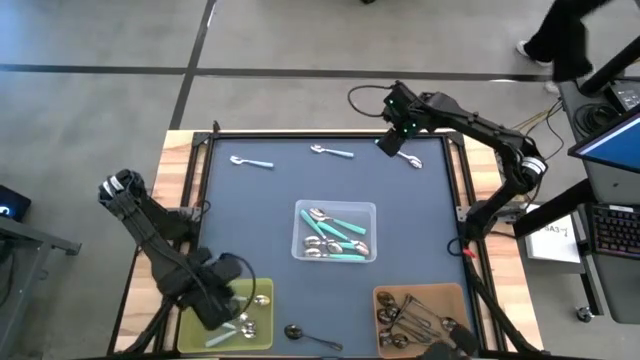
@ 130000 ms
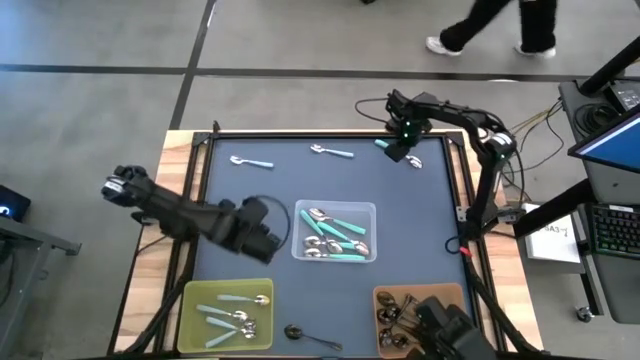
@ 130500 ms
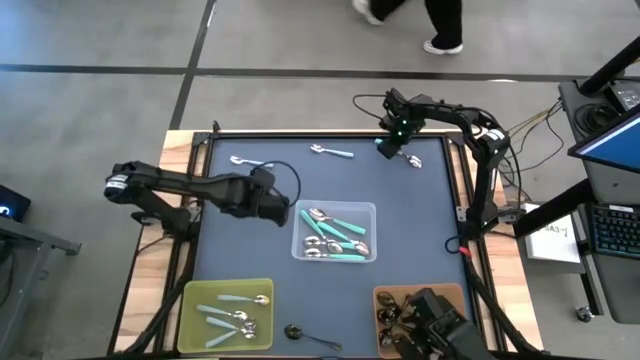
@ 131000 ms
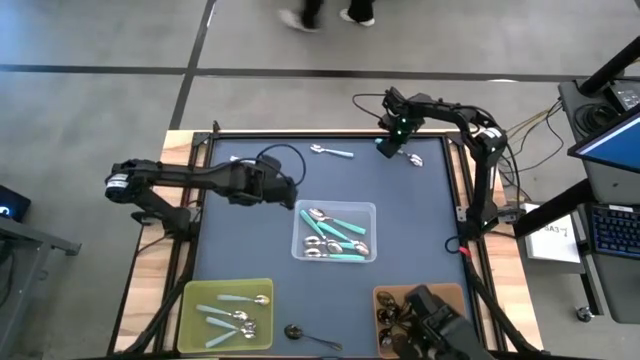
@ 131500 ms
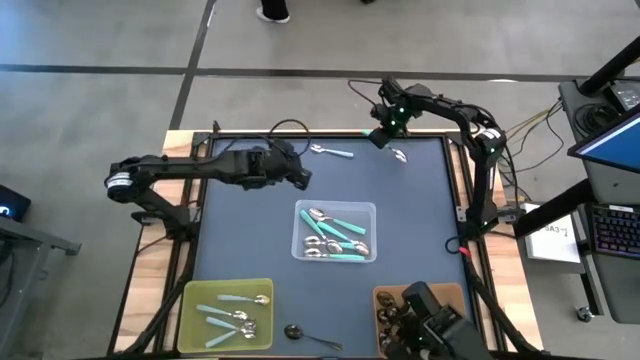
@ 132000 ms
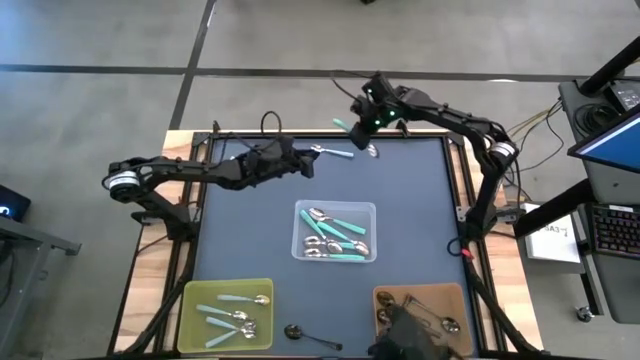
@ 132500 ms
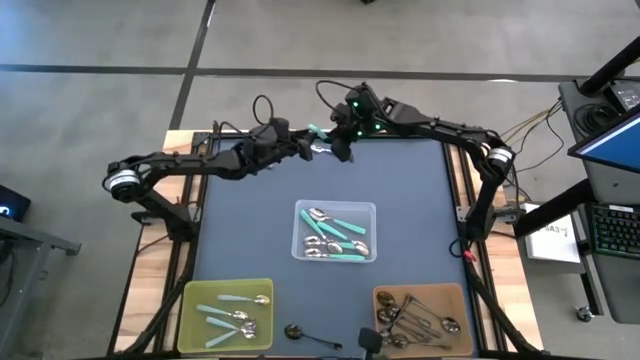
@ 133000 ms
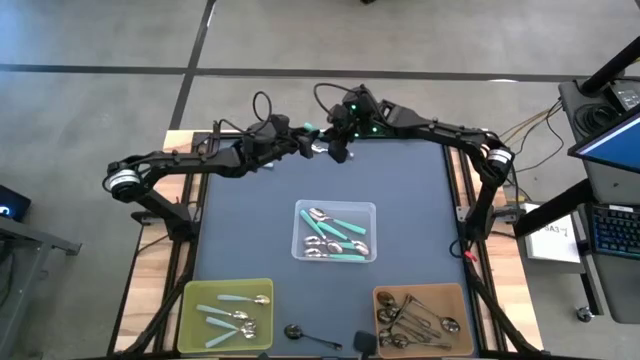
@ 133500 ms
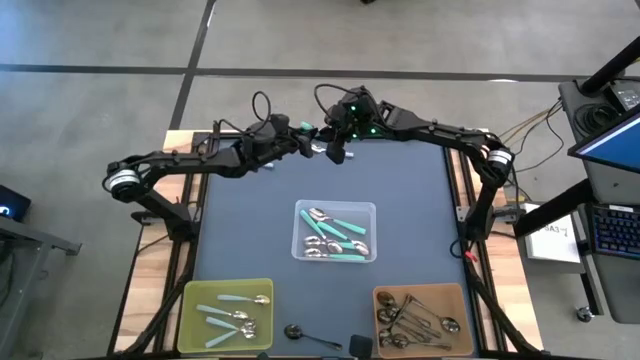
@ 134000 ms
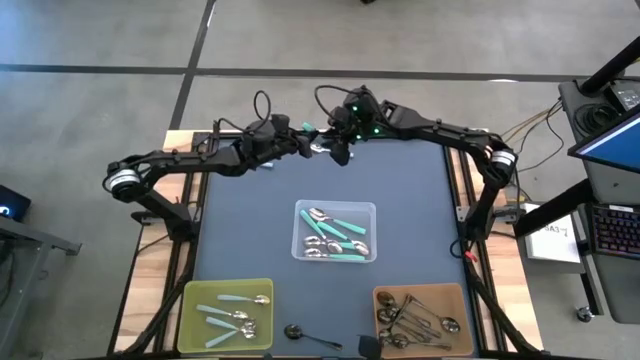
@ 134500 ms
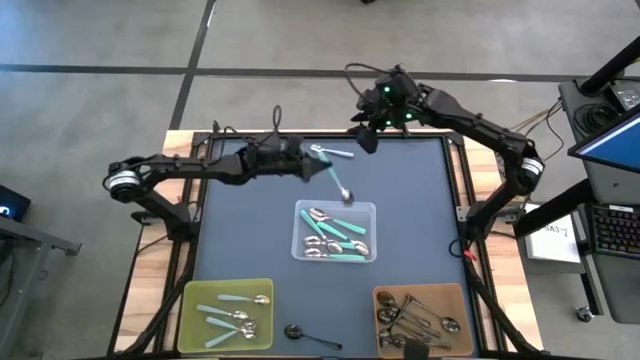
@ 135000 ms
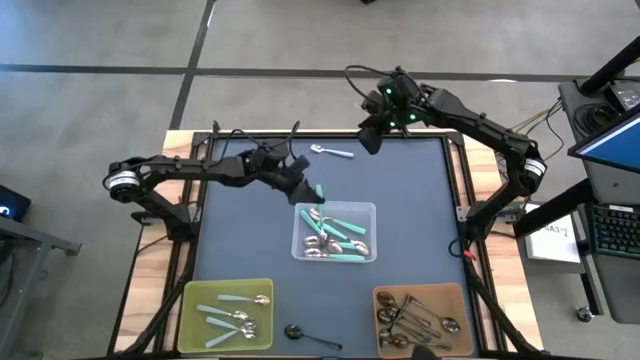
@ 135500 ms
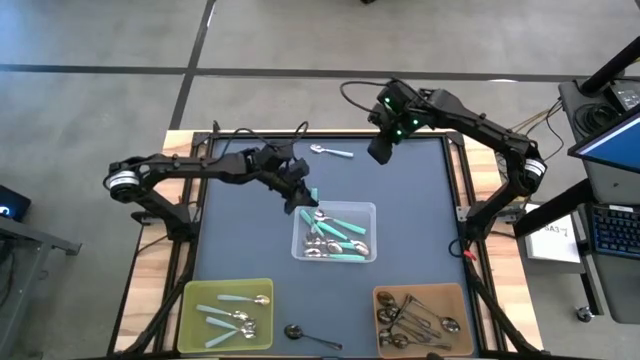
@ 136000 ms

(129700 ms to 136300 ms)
Task: Sort silverware by color (type)
Put the green spoon into the transparent bin

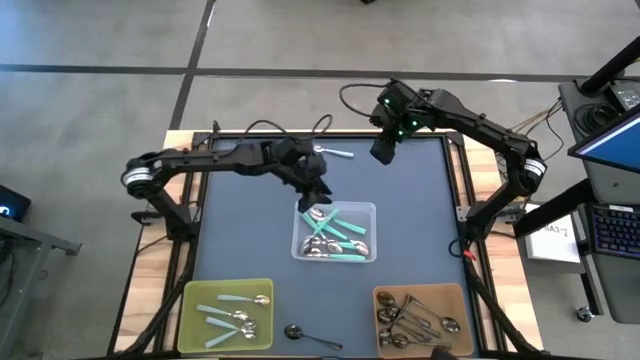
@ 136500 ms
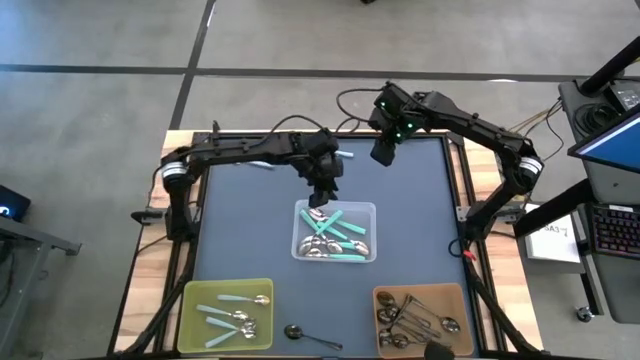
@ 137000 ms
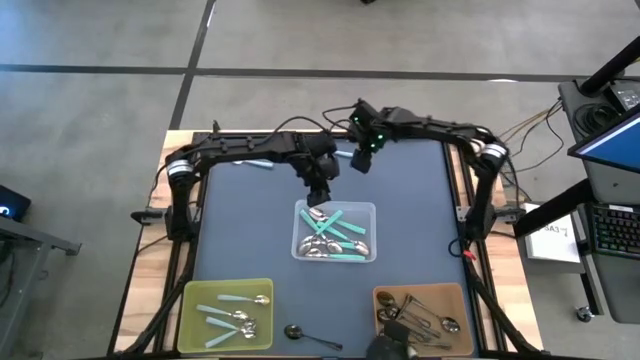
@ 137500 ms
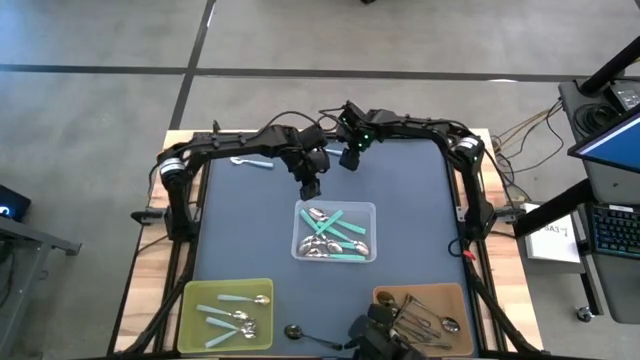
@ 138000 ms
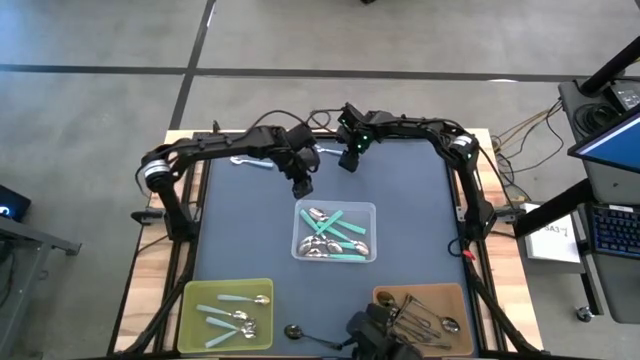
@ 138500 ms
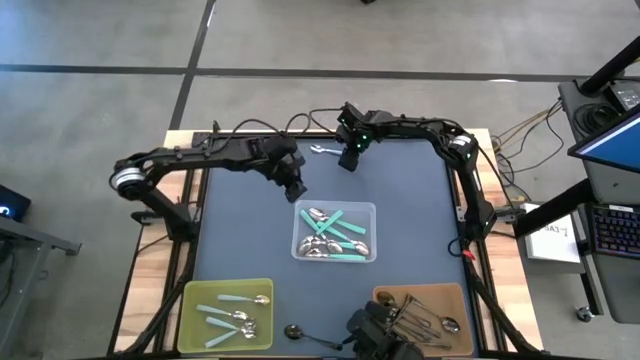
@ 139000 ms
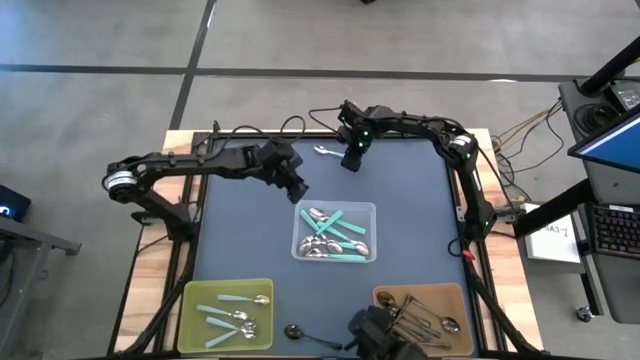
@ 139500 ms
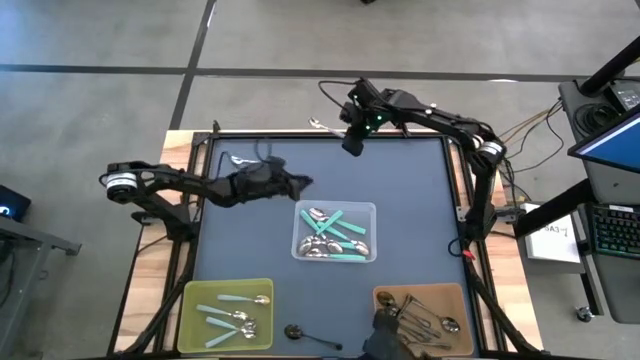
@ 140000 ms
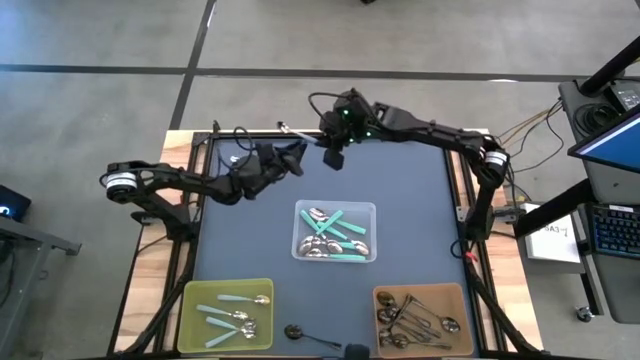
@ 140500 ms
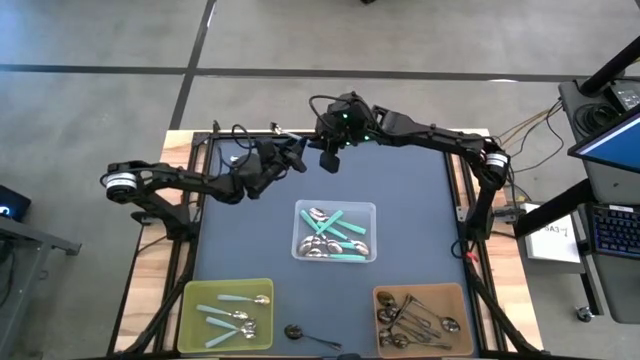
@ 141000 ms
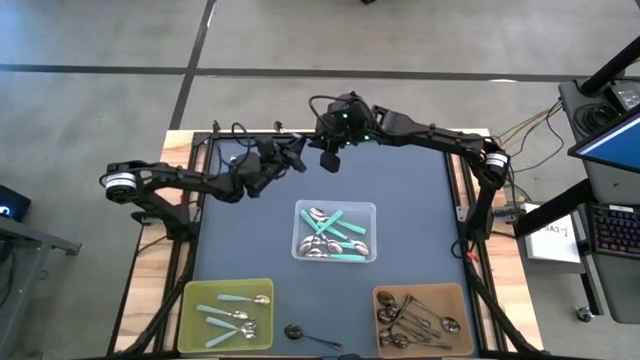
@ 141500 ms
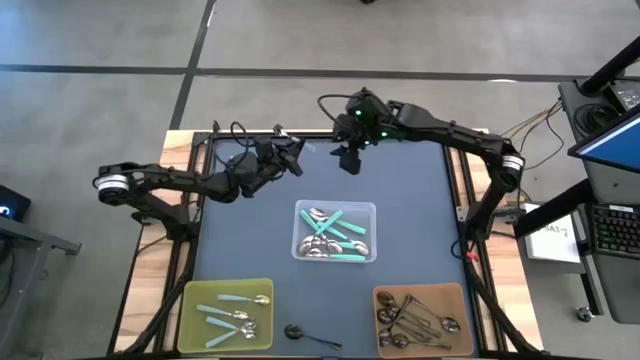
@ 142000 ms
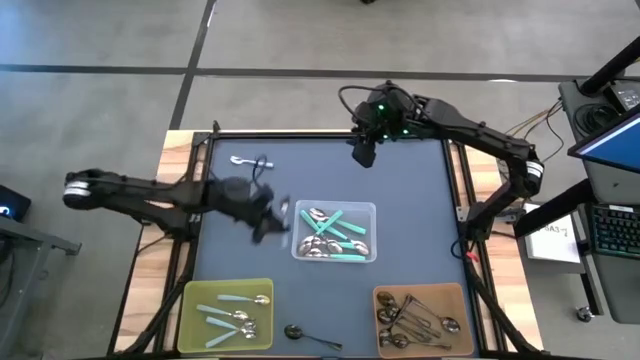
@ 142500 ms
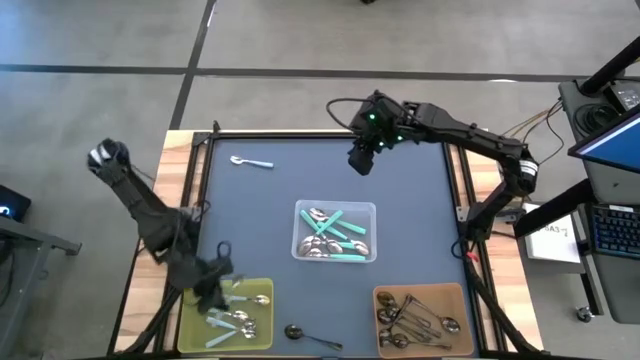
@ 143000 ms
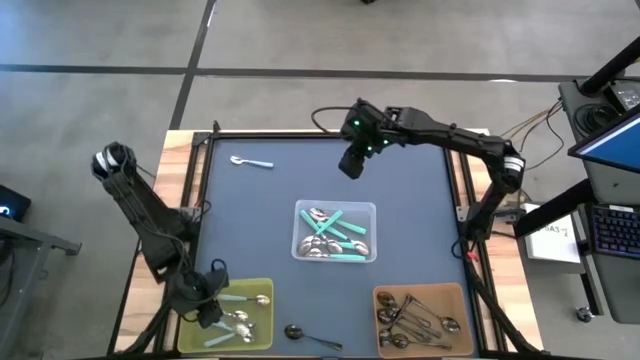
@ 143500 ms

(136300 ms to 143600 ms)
Put the light blue spoon into the yellow bin

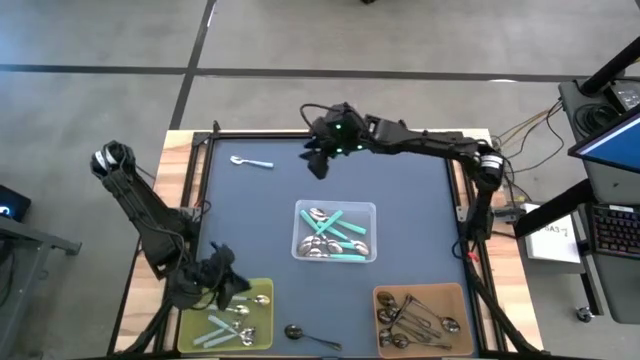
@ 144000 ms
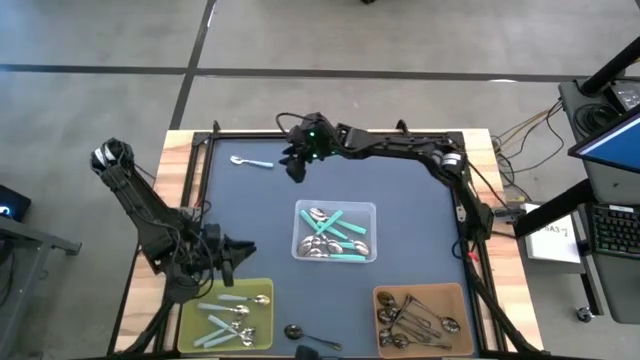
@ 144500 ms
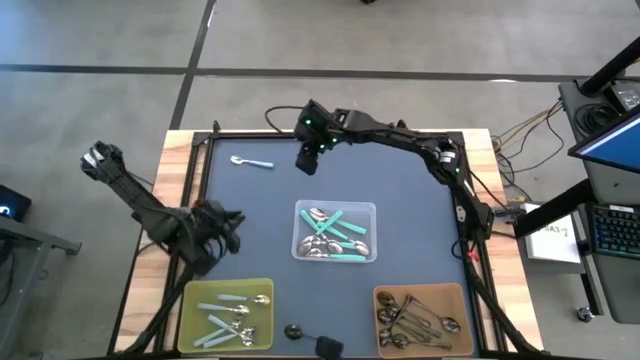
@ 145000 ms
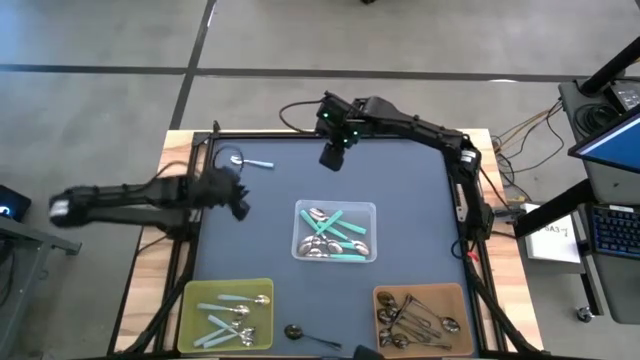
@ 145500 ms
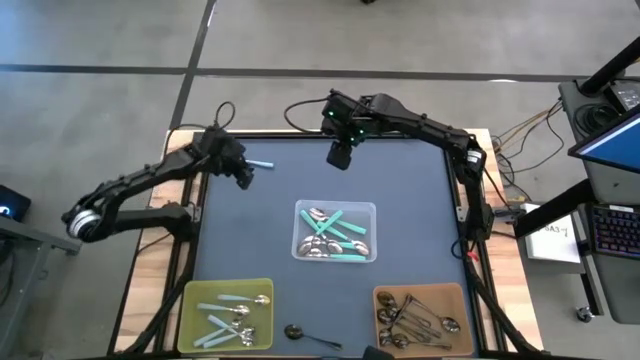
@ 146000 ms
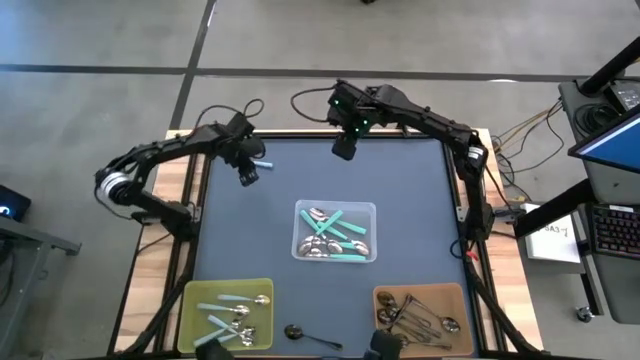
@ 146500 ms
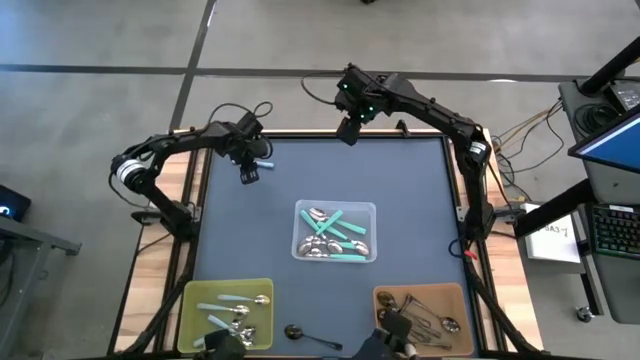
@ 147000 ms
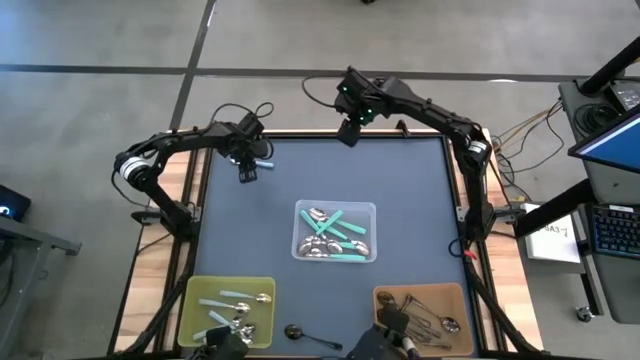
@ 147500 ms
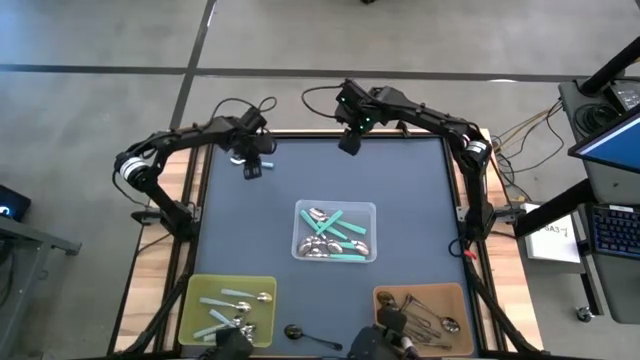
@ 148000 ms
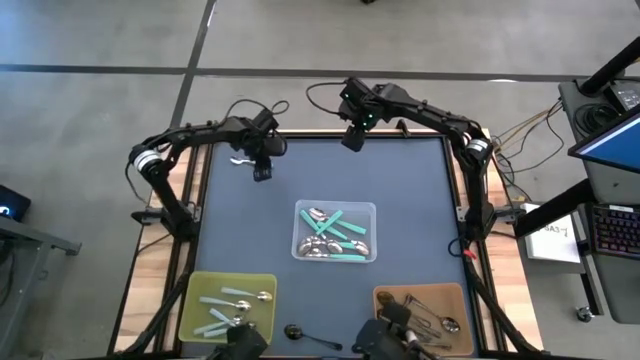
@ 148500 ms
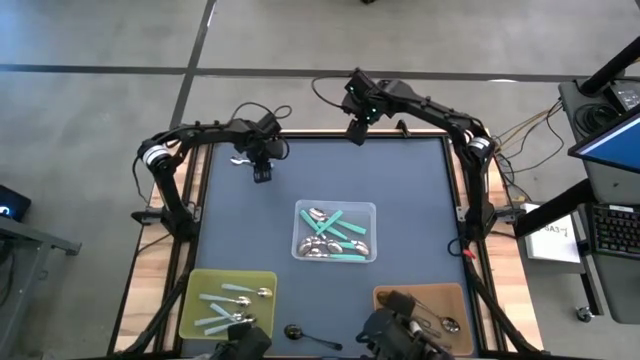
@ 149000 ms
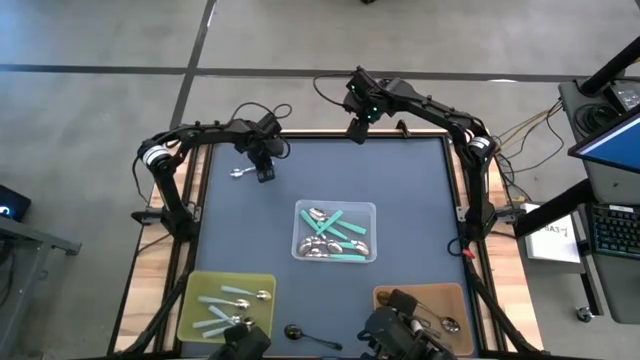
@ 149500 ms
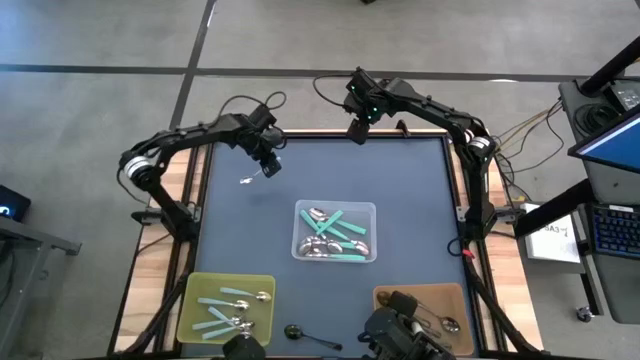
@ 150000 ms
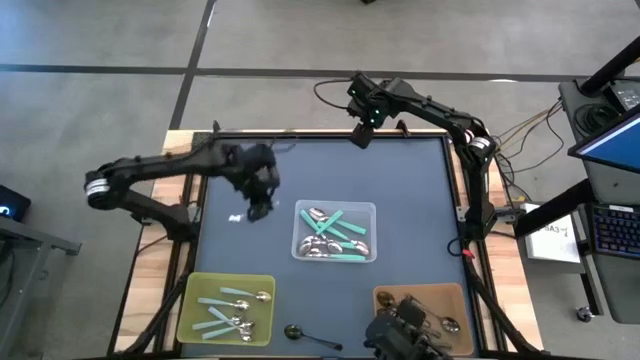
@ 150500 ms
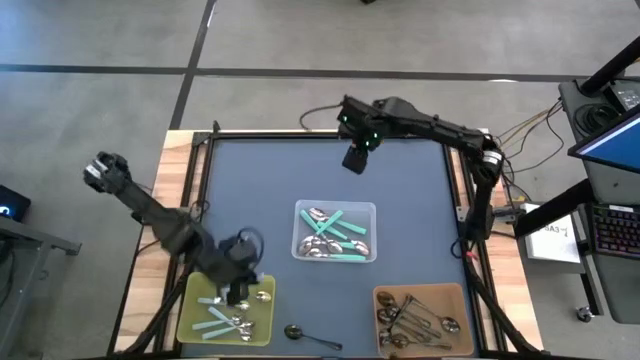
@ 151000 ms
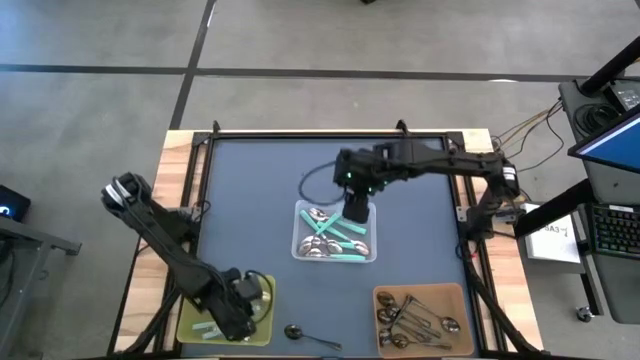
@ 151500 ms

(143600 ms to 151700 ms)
Put the light blue spoon into the yellow bin
